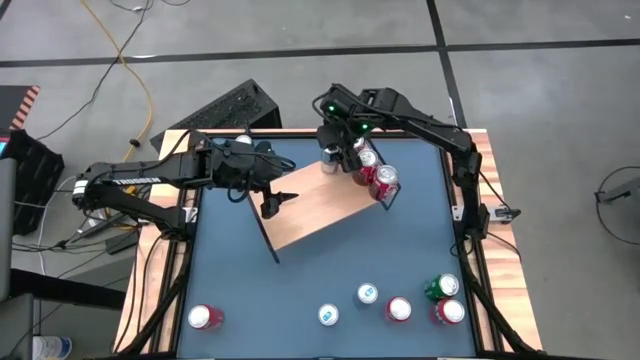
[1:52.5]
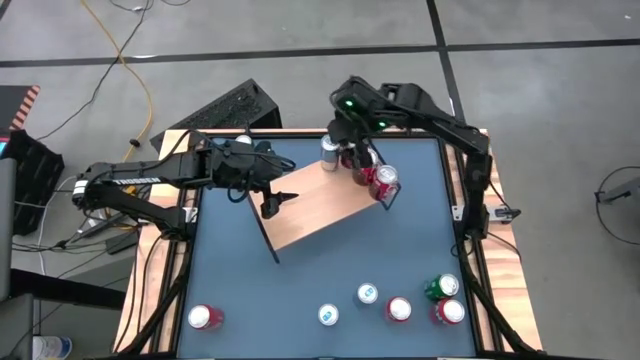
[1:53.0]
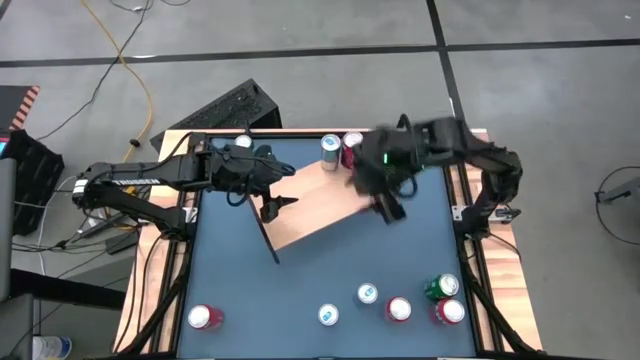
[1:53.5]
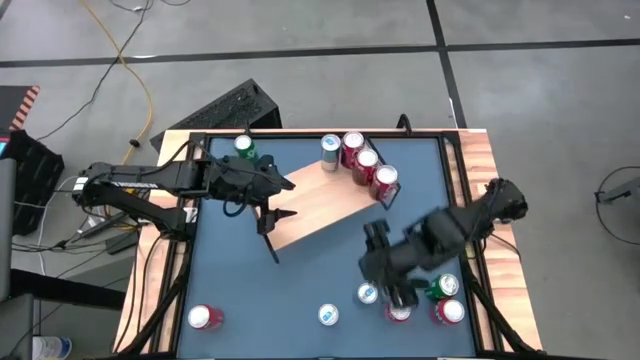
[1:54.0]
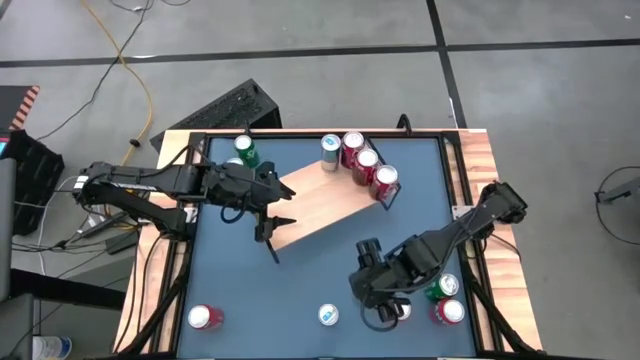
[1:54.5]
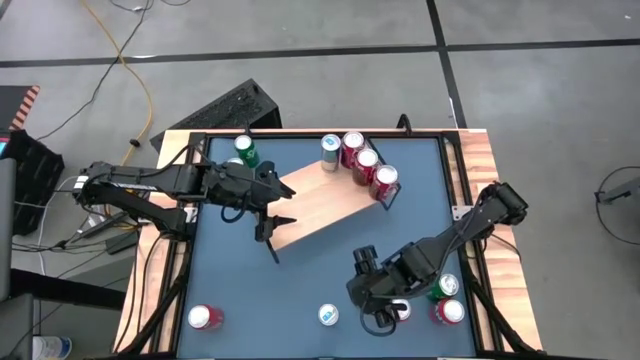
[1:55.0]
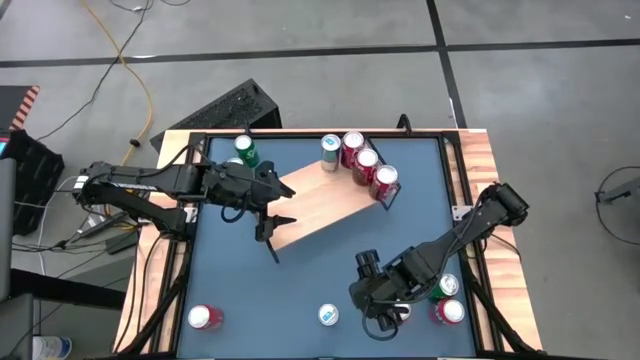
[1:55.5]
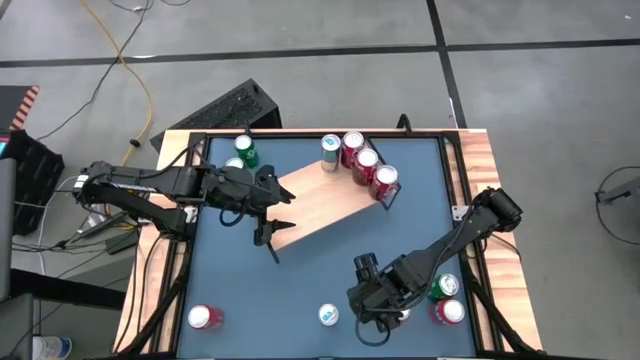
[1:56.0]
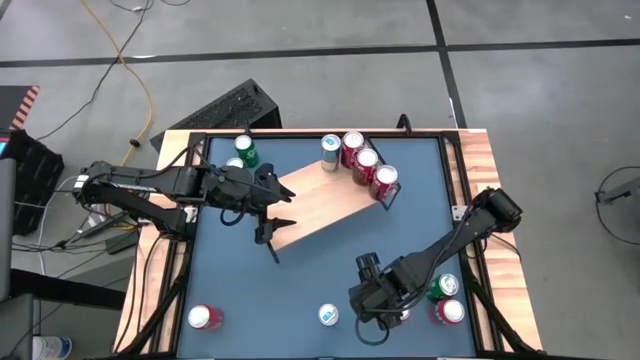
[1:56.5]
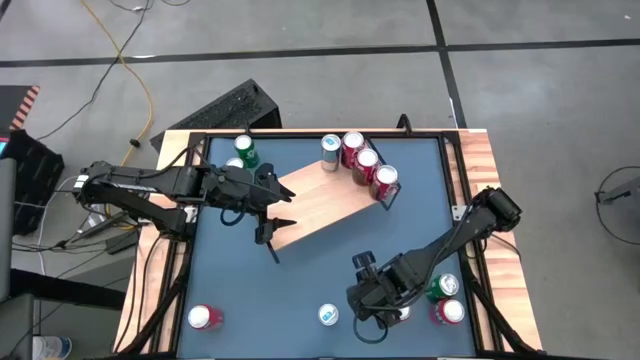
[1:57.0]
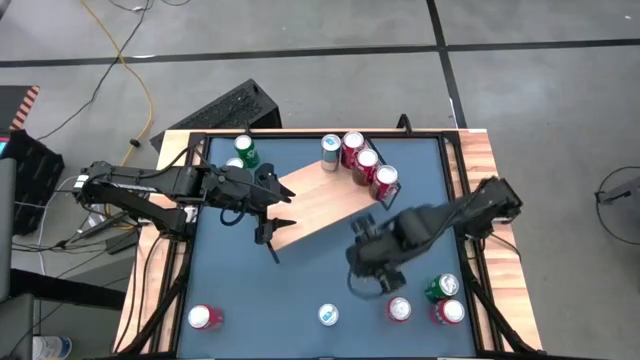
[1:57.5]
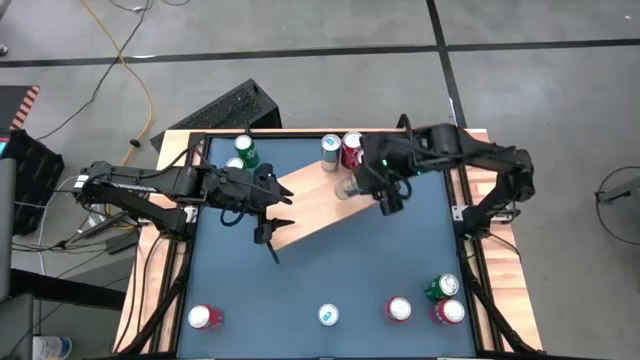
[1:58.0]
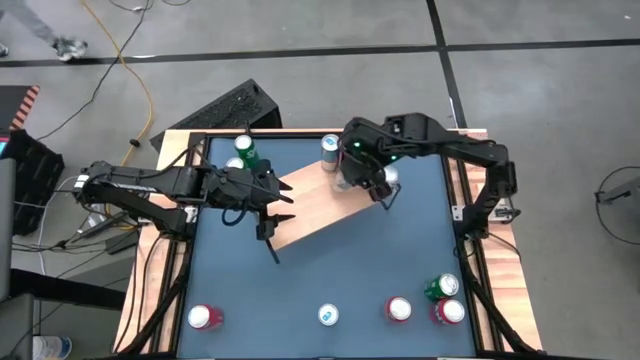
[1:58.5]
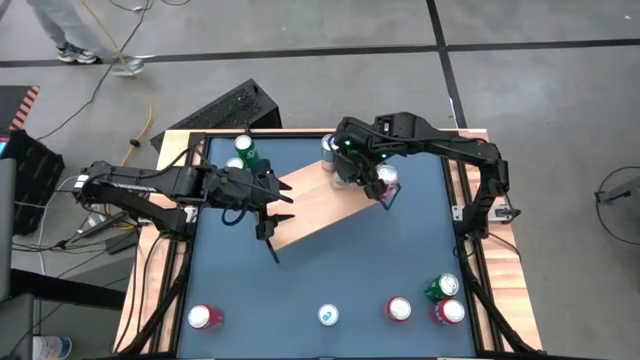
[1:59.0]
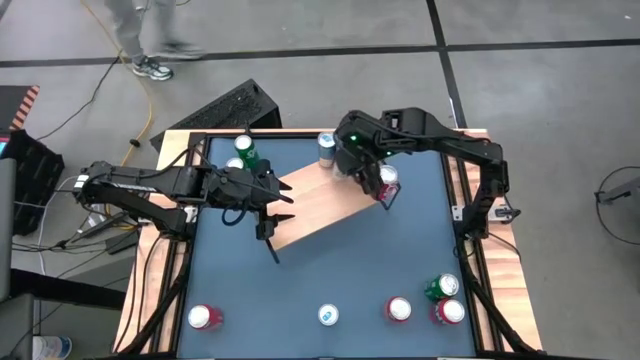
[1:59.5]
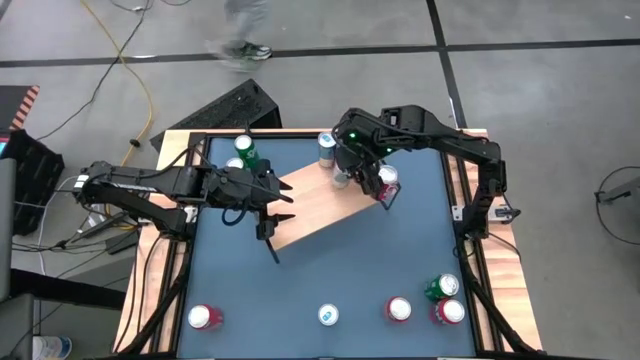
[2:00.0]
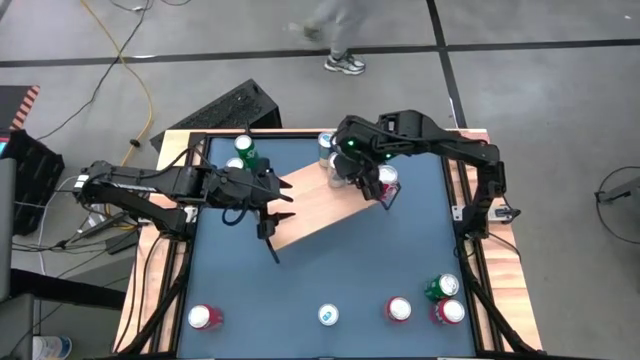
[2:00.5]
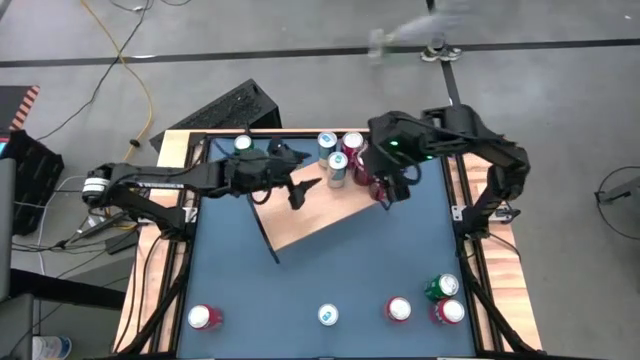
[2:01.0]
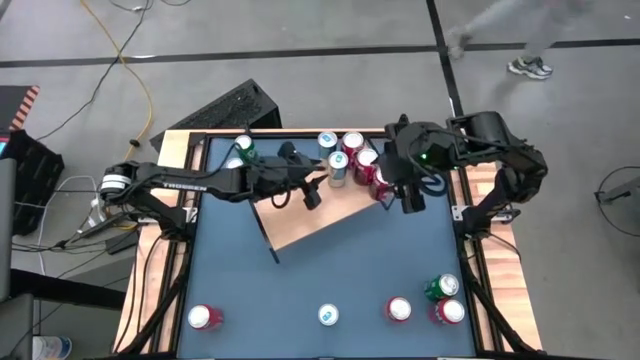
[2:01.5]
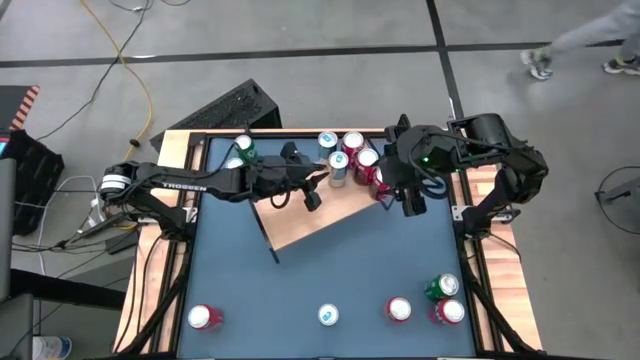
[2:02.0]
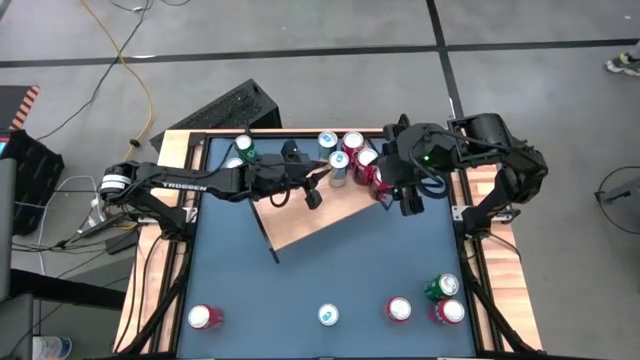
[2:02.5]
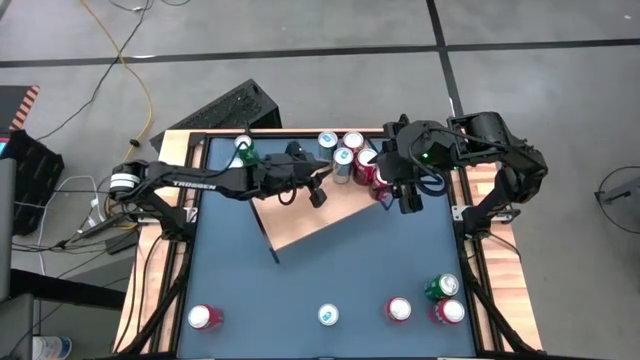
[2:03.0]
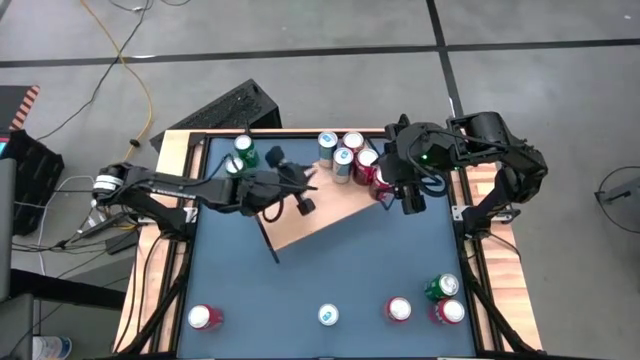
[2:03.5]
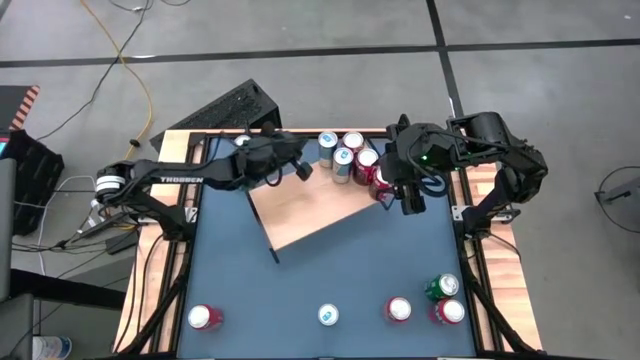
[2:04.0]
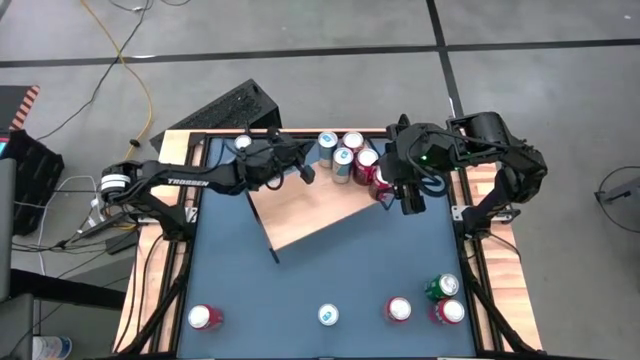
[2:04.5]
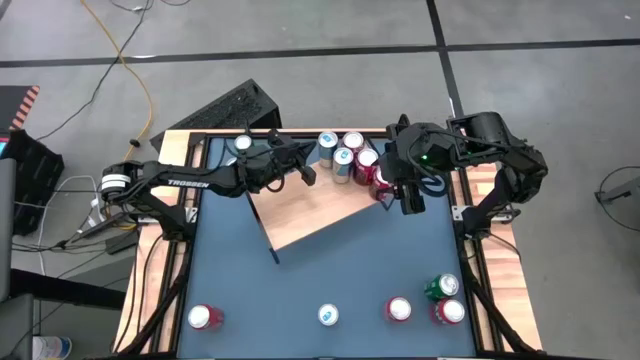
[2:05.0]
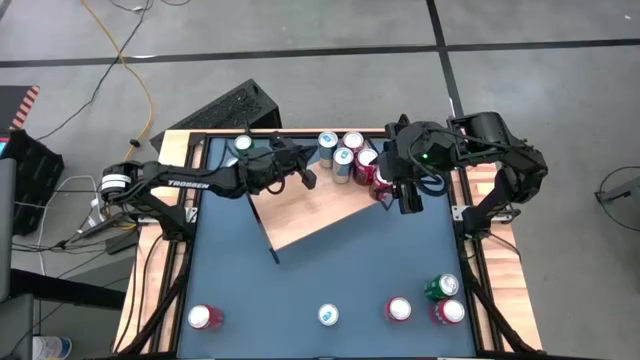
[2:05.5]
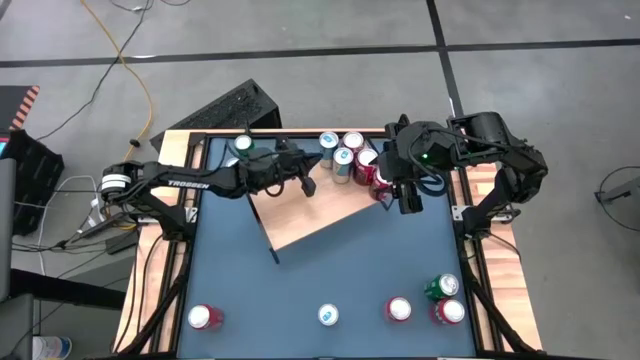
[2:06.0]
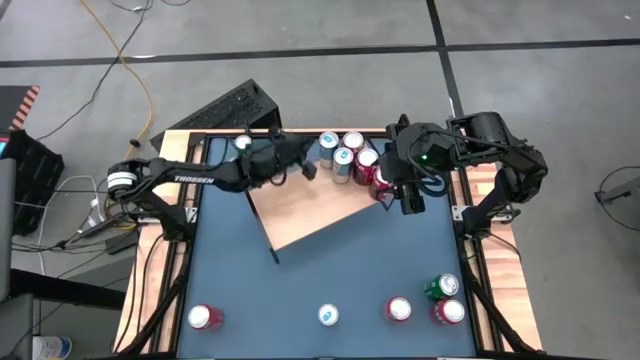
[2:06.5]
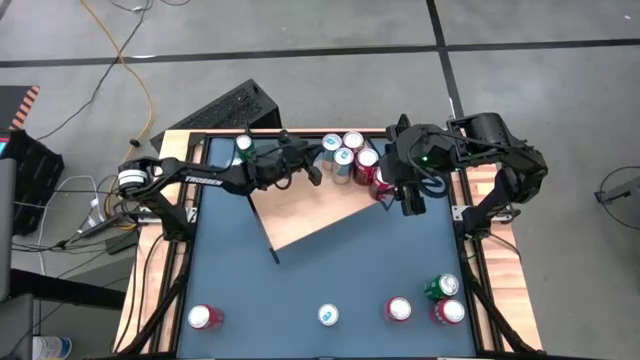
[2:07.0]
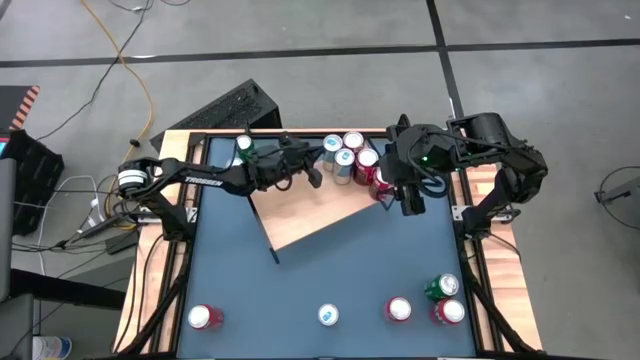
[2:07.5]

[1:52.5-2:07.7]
Task: Place canned beverage on shelf
Put the right blue soda can on the shelf aligned with the other blue soda can

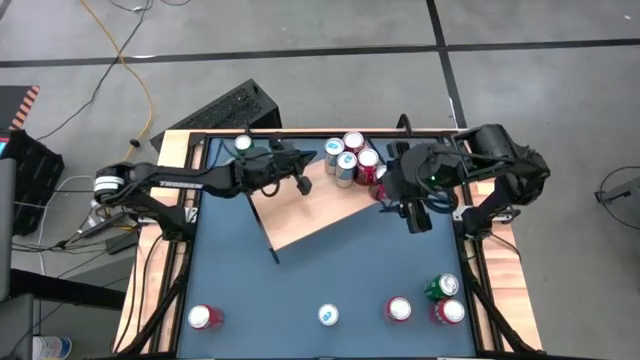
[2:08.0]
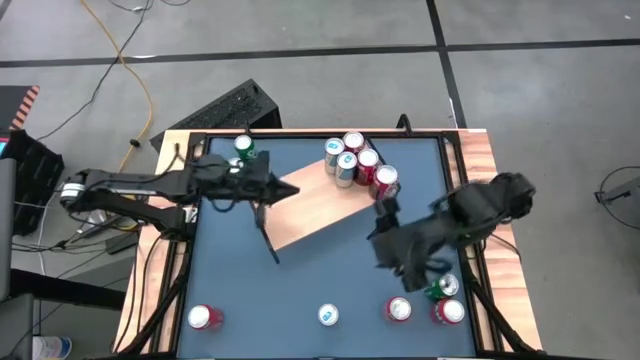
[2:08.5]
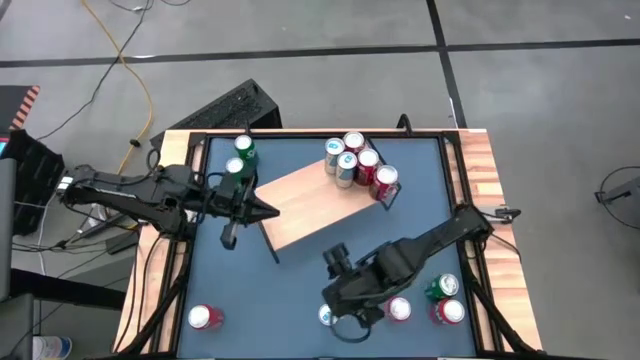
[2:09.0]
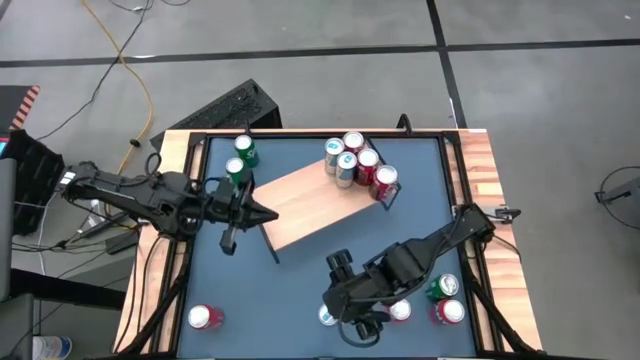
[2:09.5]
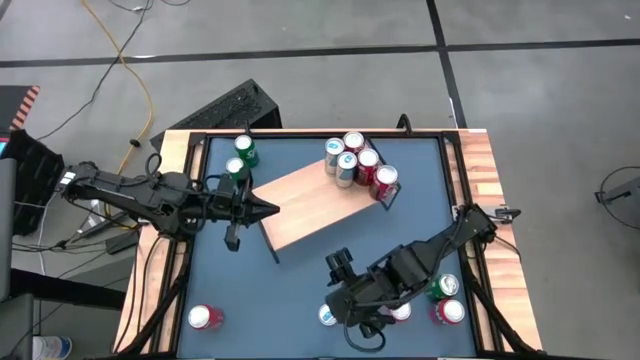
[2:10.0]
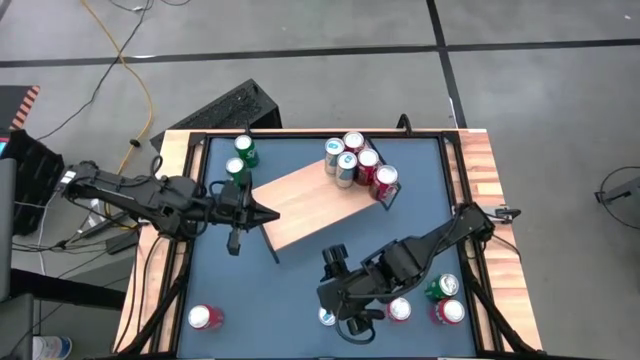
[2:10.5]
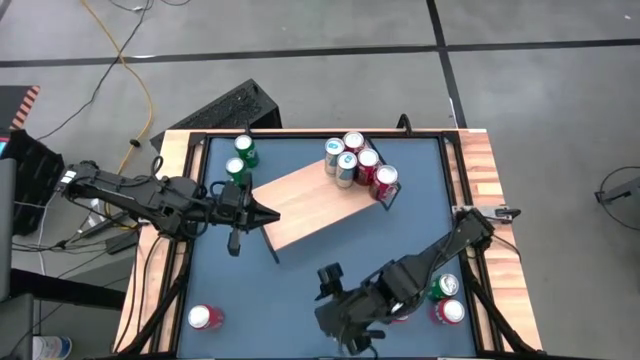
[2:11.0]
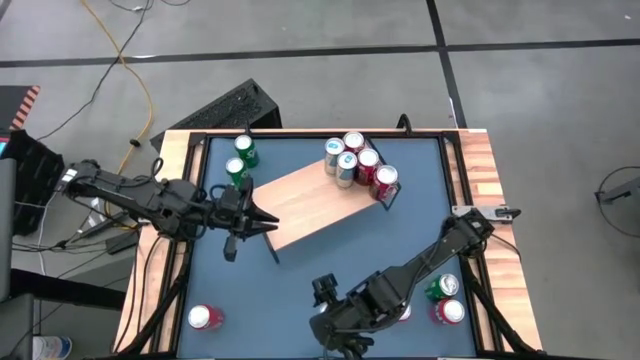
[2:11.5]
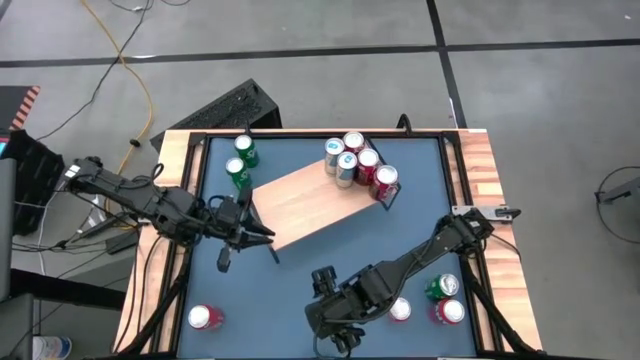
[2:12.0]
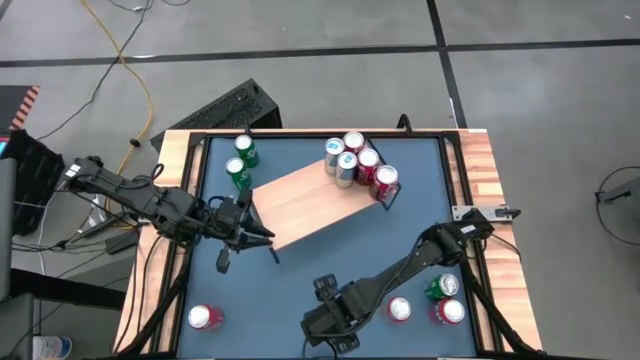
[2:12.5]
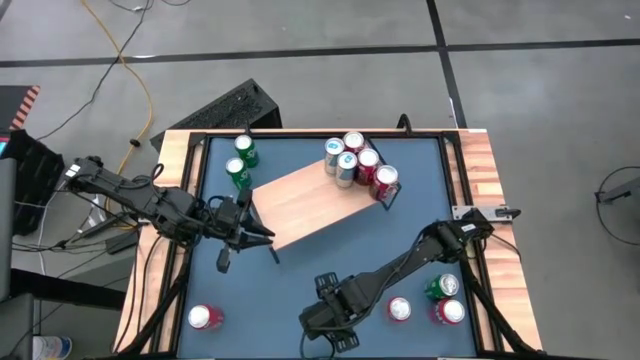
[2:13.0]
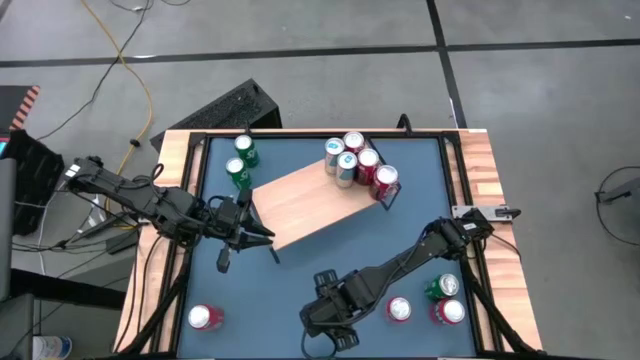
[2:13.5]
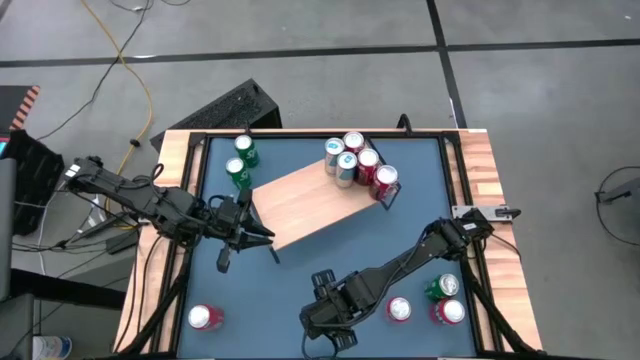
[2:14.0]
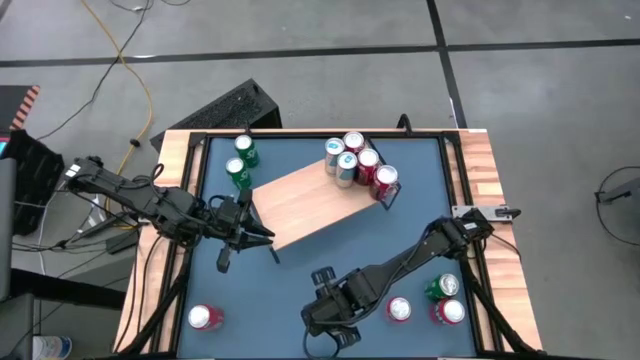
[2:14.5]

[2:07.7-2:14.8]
Put the blue soda can on the shelf aligned with the other blue soda cans
